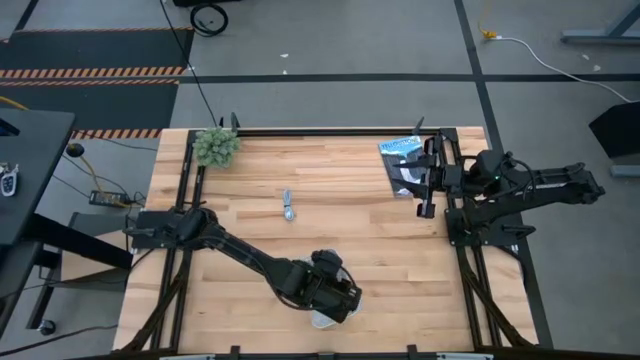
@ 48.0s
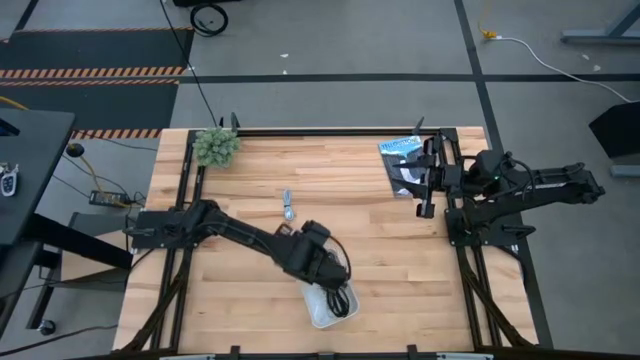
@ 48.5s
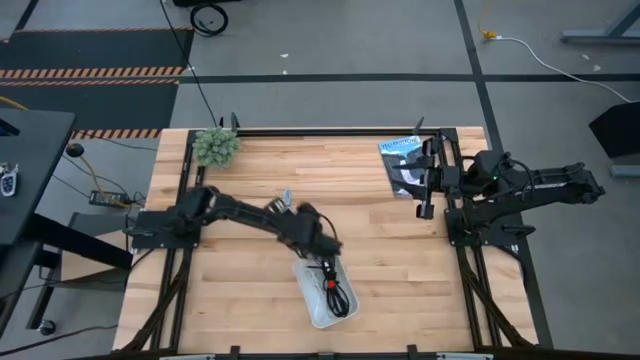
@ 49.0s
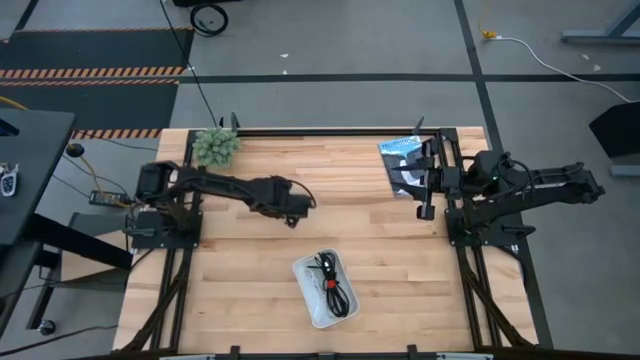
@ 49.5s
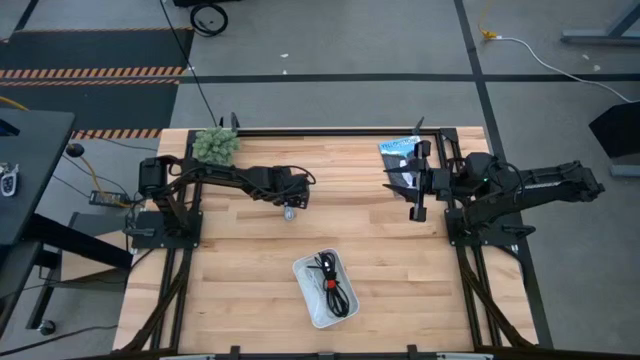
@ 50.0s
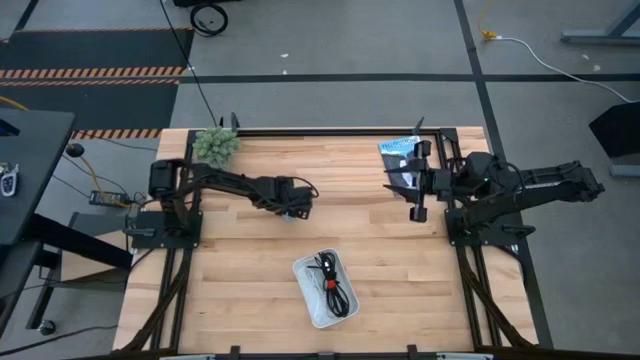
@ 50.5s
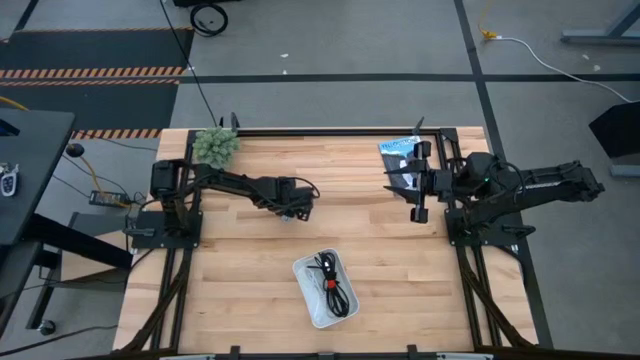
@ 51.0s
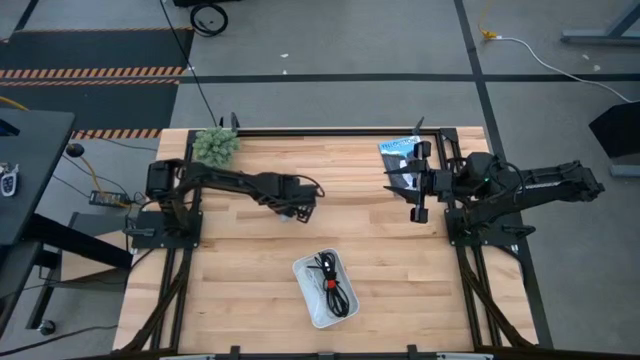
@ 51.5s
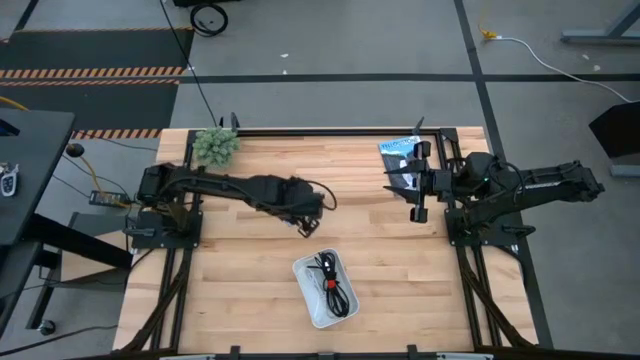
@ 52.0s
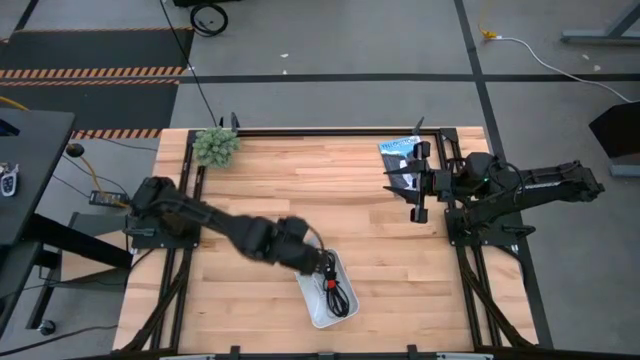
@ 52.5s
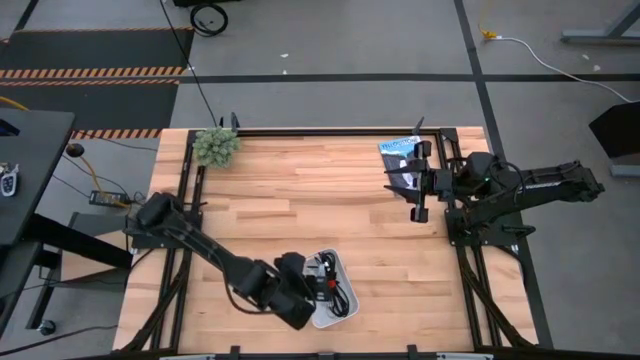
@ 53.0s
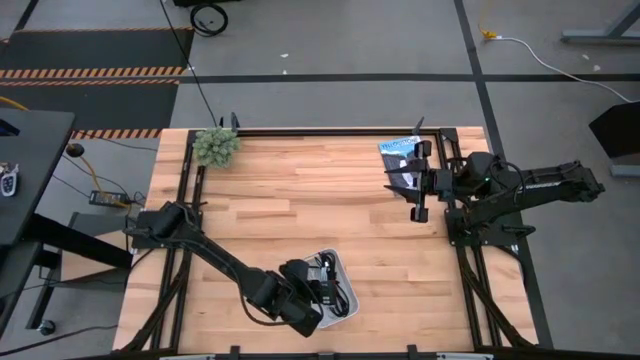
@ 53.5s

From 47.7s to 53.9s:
Task: Pick and place USB-C Cables
Put the blue charger cable into the white bin

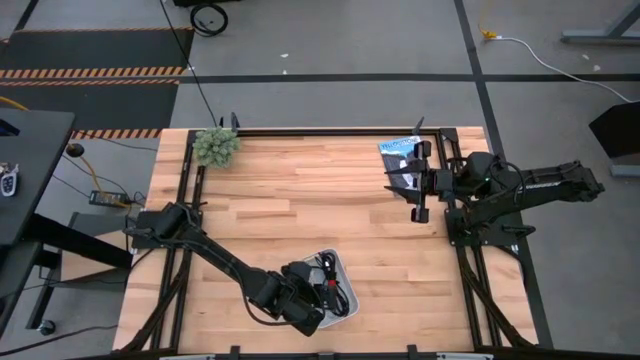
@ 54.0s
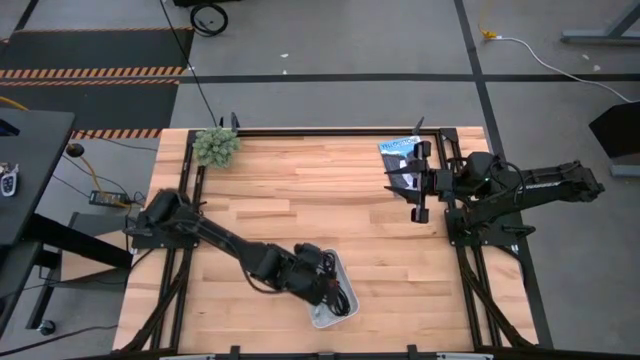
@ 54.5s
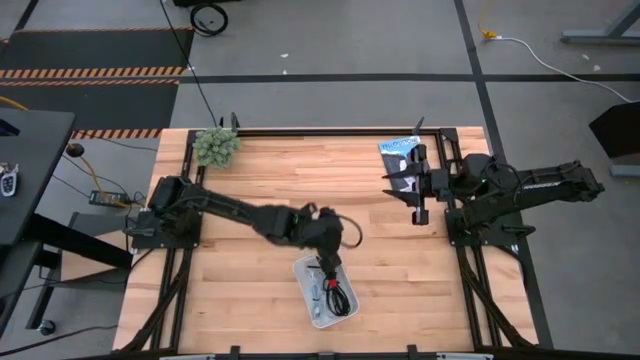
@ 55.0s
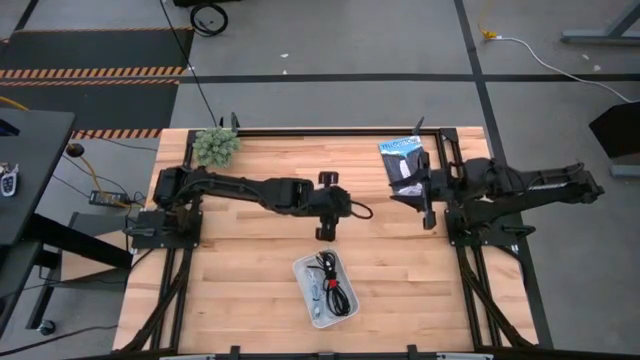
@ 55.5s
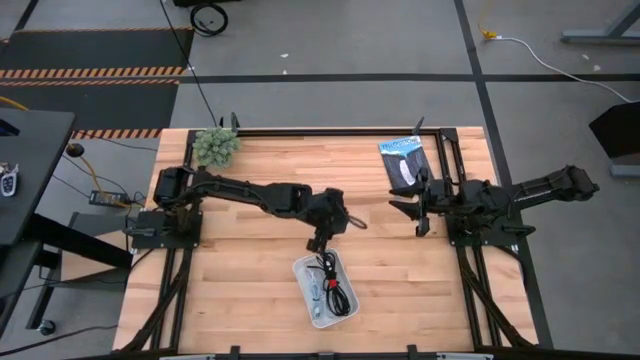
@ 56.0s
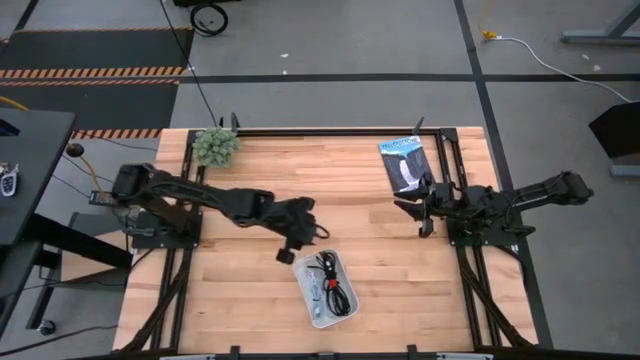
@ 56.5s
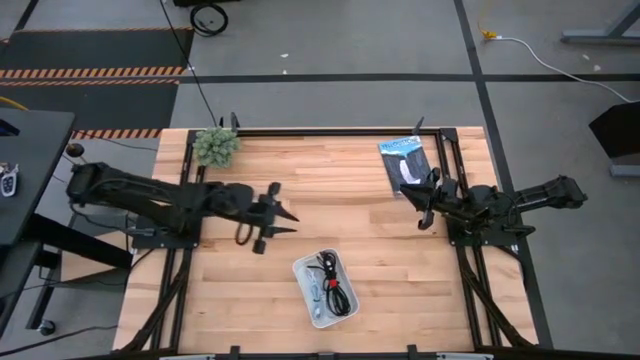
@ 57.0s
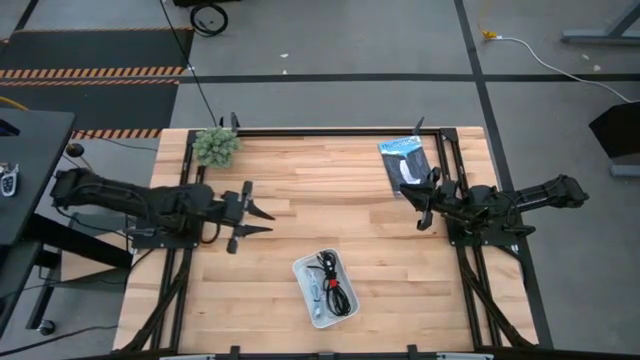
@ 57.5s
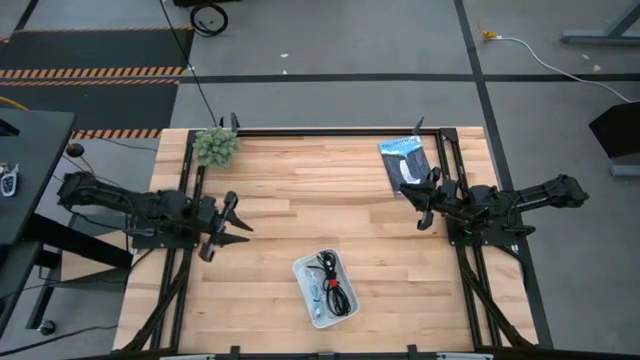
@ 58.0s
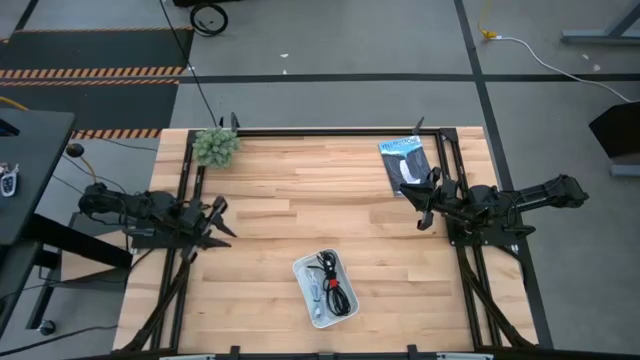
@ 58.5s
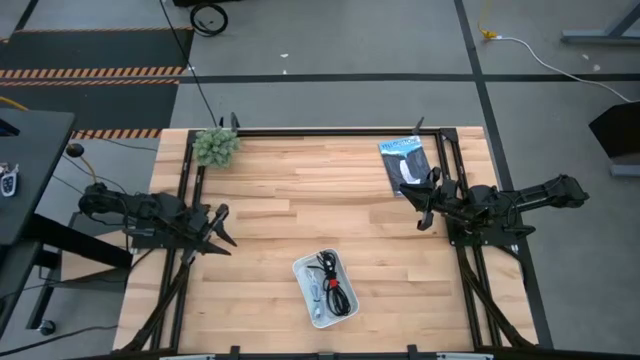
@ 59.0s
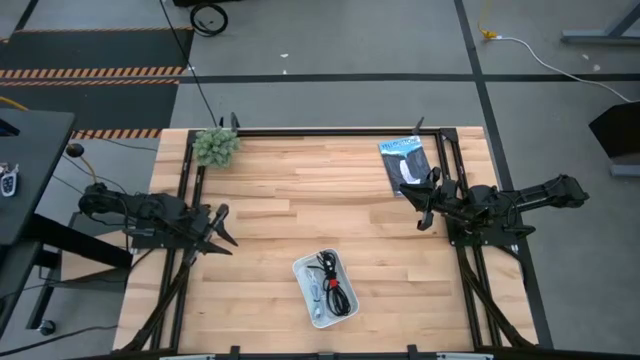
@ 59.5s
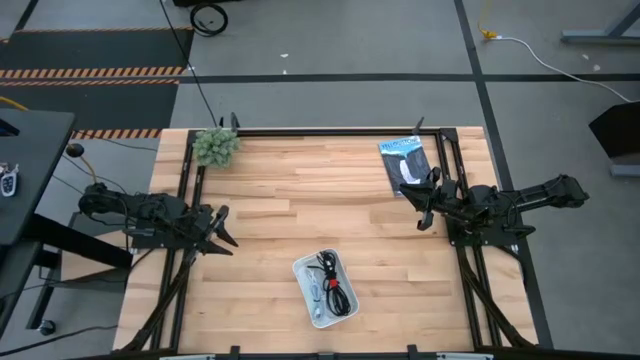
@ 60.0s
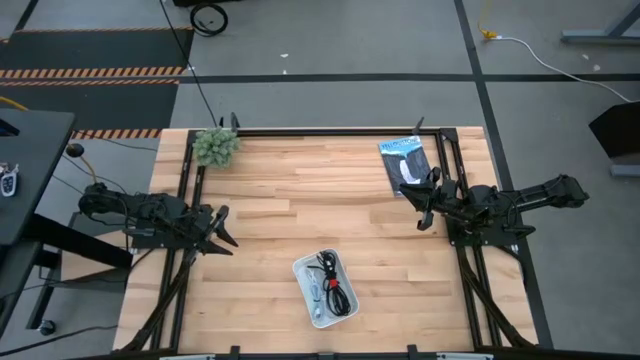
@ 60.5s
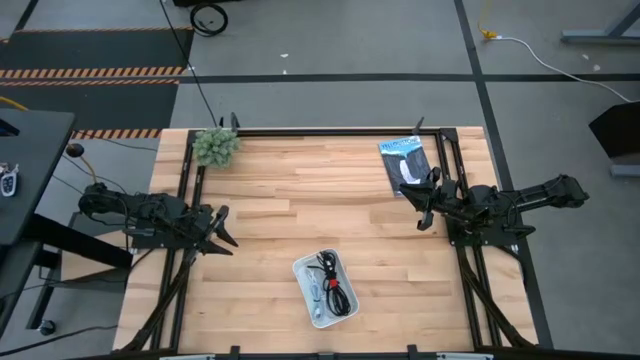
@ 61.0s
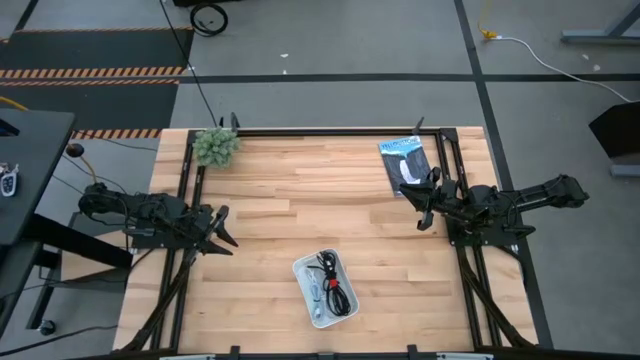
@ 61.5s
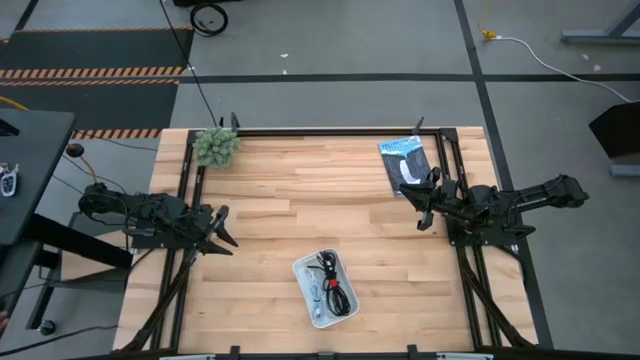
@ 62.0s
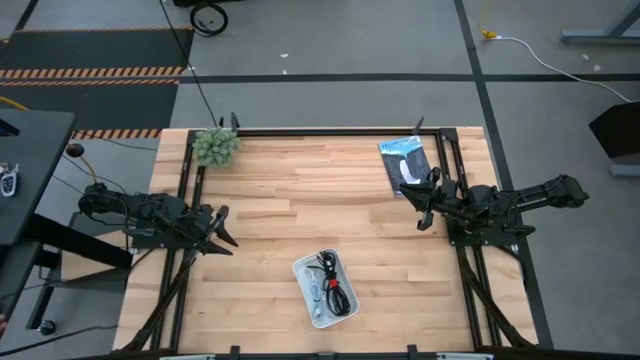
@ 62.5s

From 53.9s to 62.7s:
Return to Home Position
